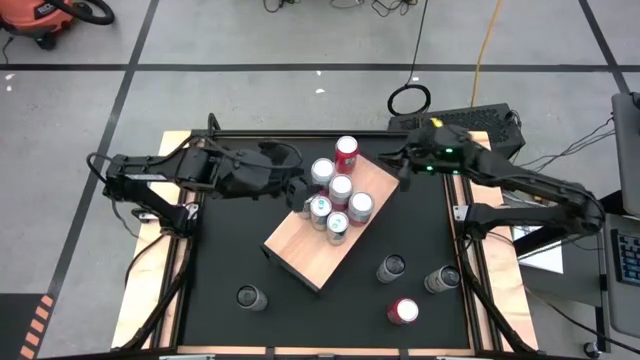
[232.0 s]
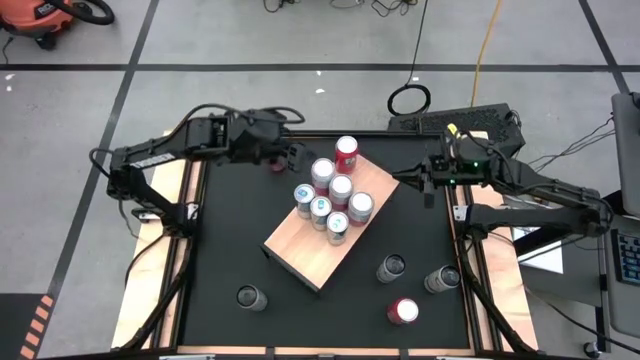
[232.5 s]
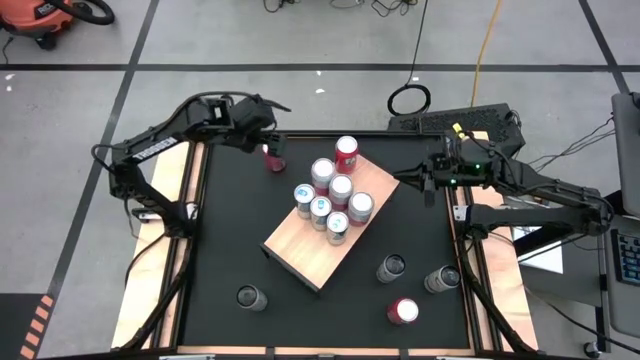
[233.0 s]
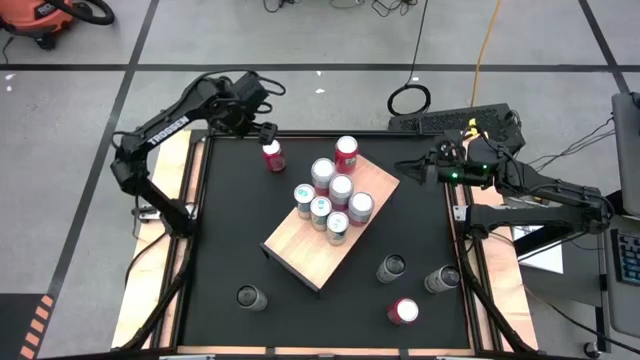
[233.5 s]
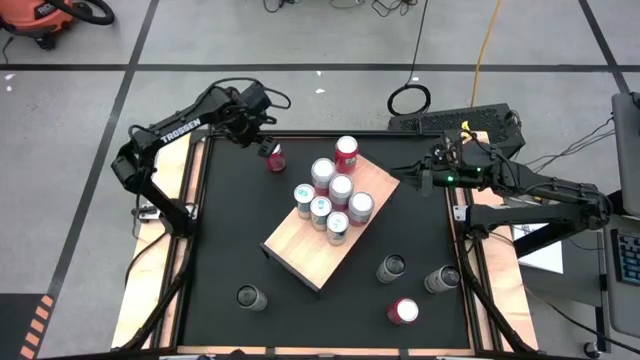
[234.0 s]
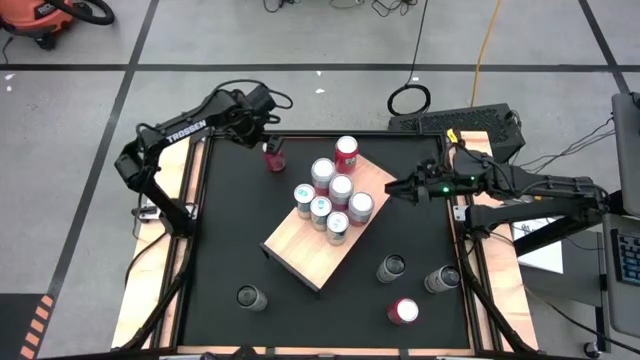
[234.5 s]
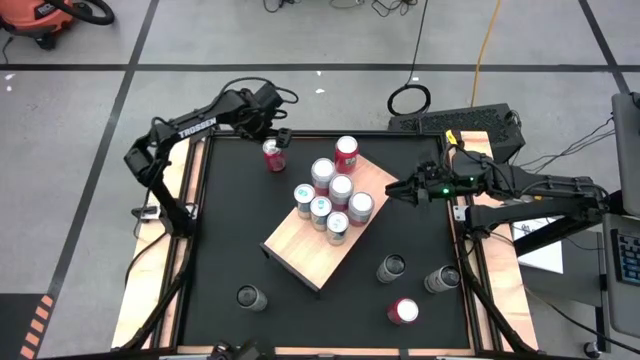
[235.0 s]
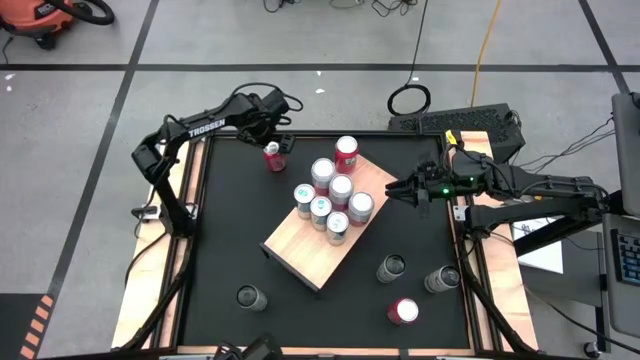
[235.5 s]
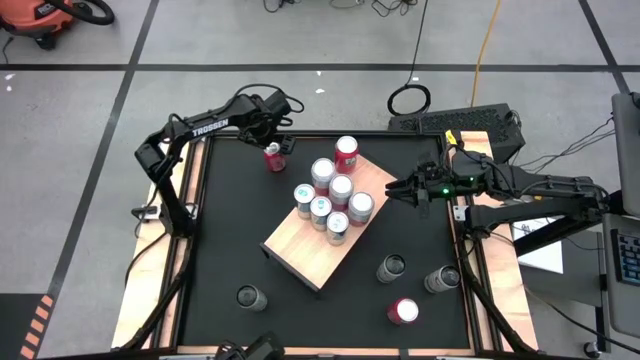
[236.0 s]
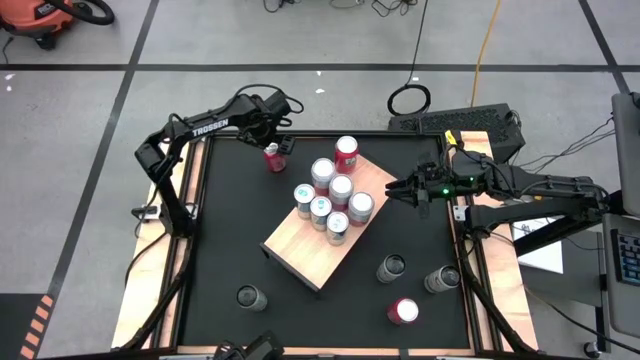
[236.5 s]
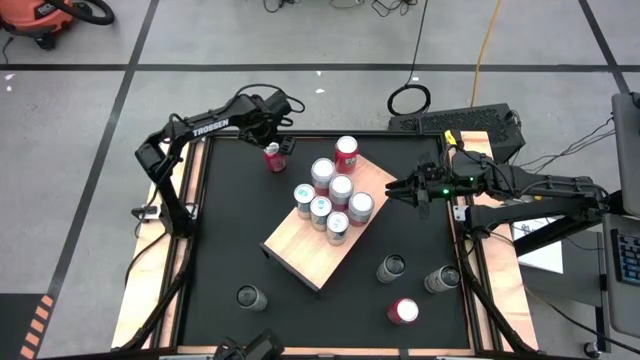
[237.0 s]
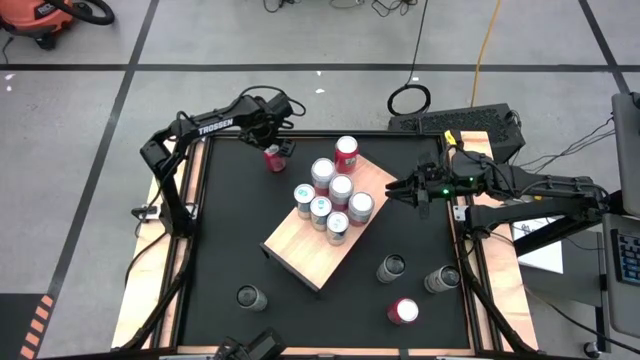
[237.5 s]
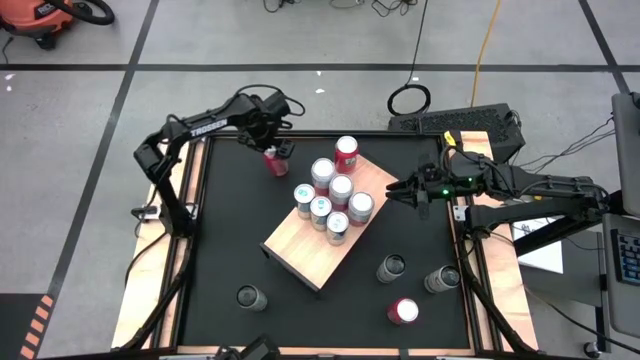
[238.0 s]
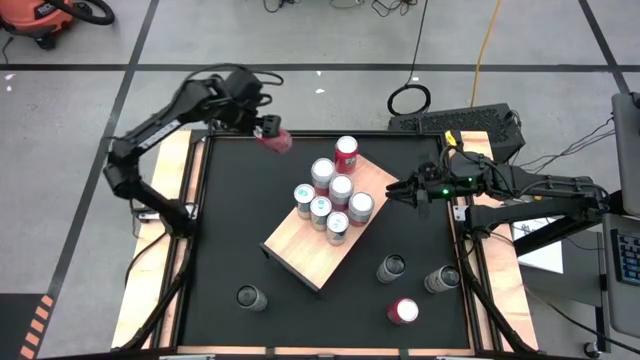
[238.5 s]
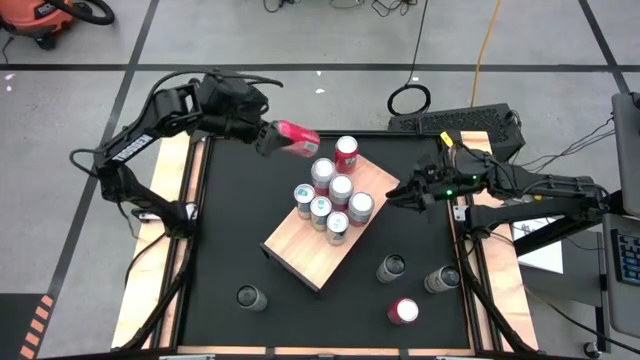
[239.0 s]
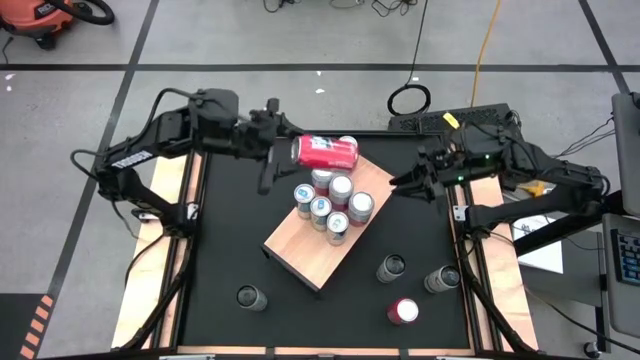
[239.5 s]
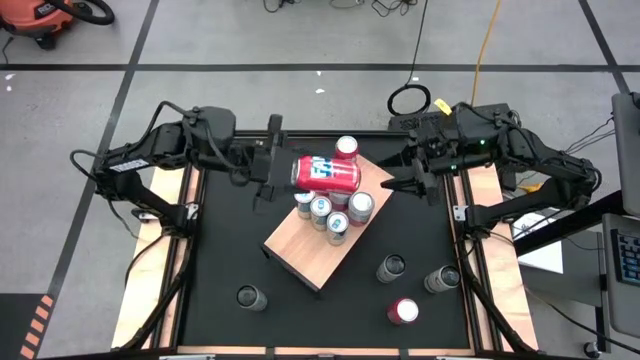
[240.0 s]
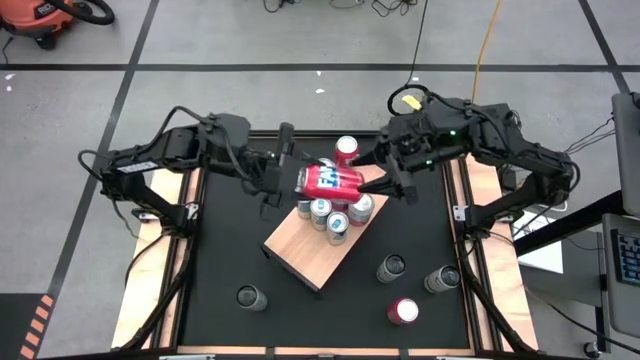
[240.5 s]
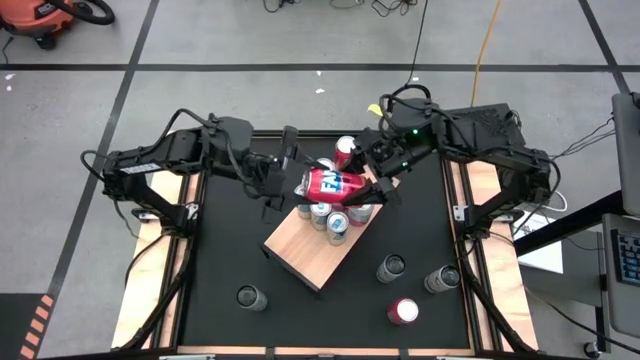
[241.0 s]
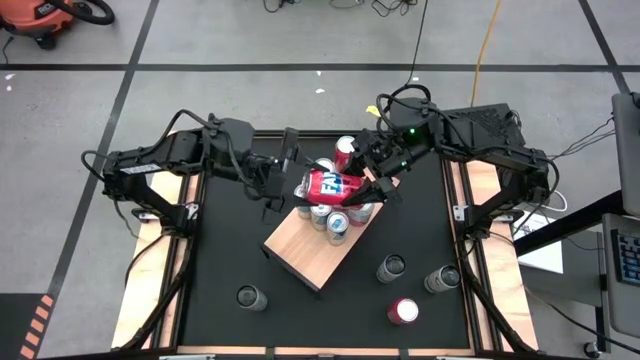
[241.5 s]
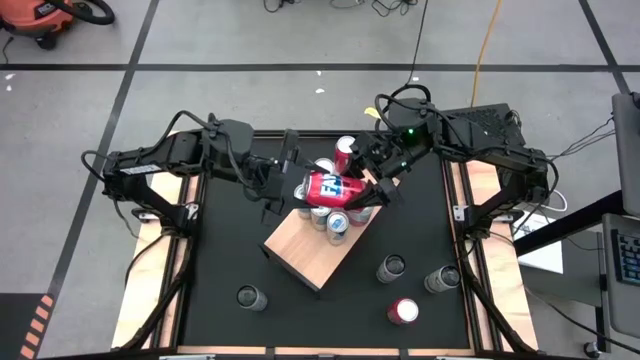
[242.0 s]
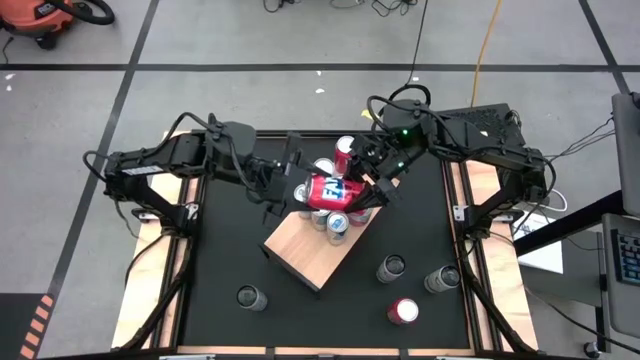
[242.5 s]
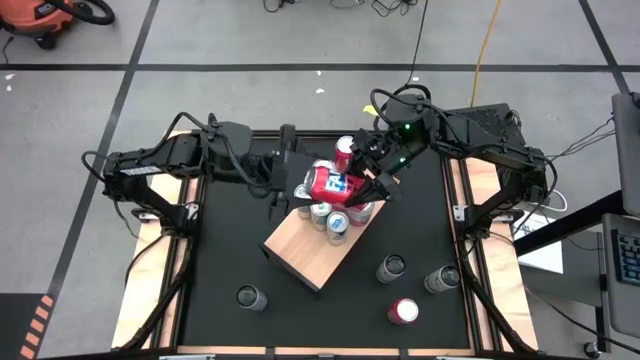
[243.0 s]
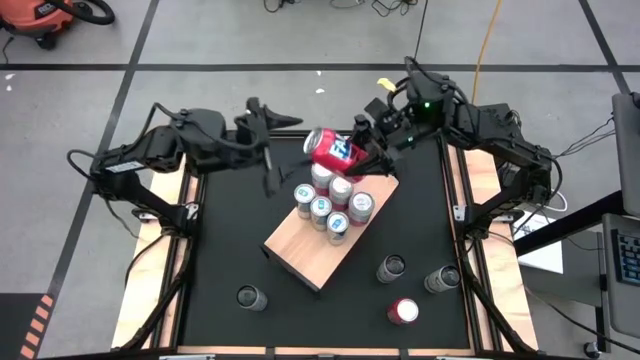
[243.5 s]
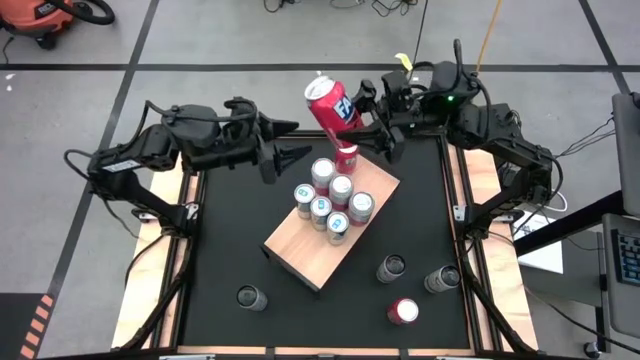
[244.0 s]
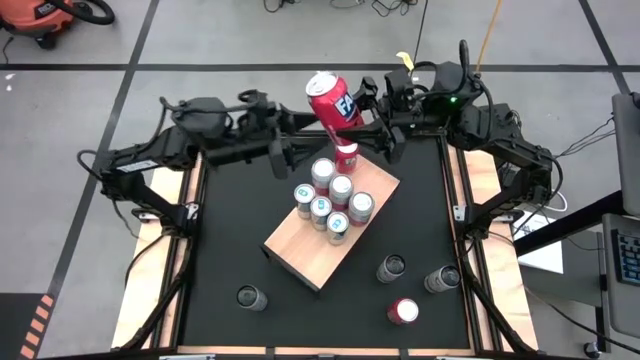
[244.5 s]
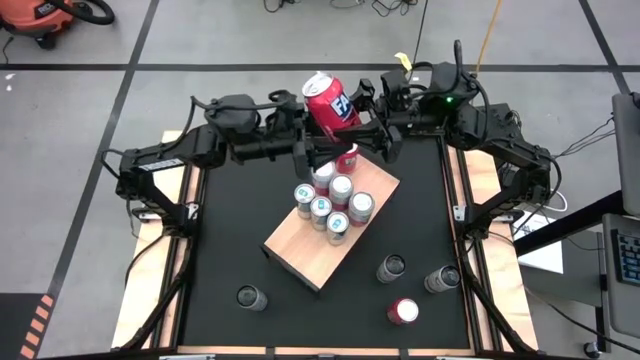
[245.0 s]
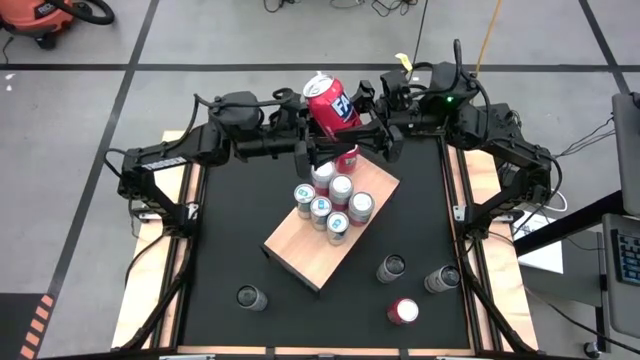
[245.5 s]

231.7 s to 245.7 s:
Task: Place canned beverage on shelf
Put the top red soda can on the shelf aligned with the red soda can

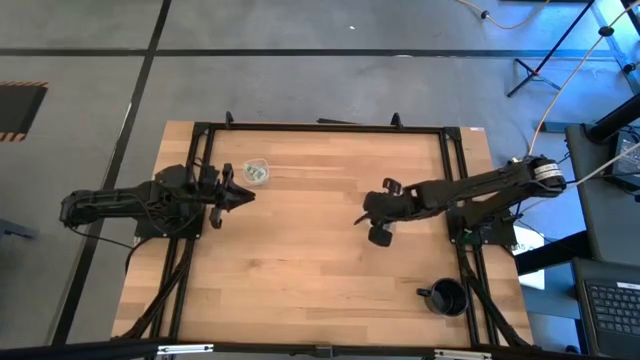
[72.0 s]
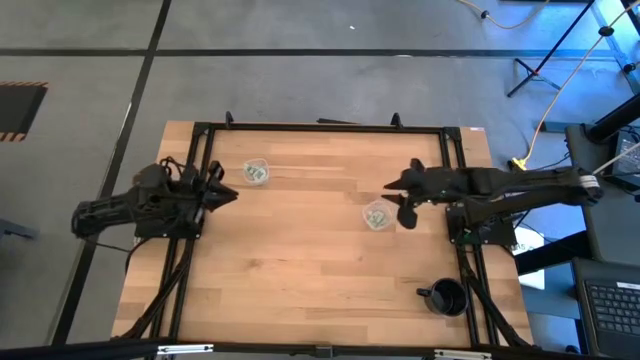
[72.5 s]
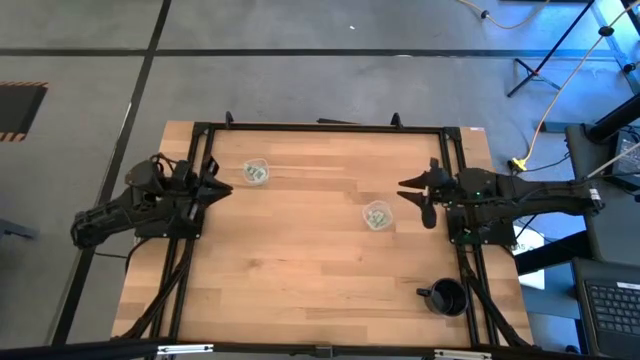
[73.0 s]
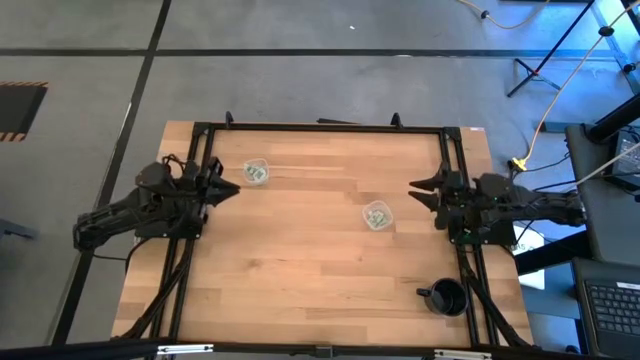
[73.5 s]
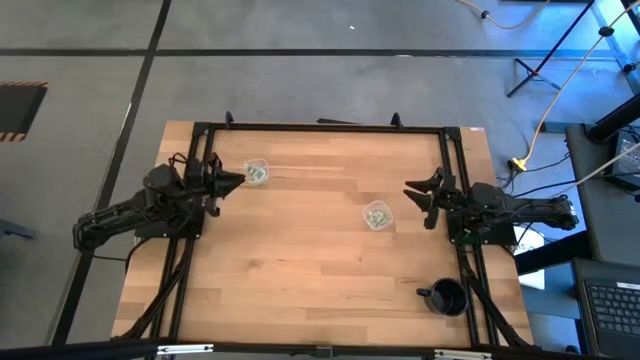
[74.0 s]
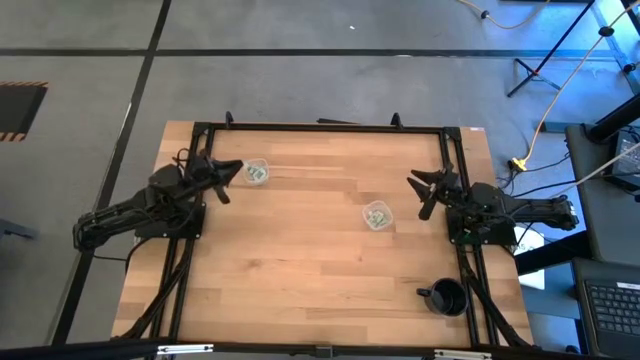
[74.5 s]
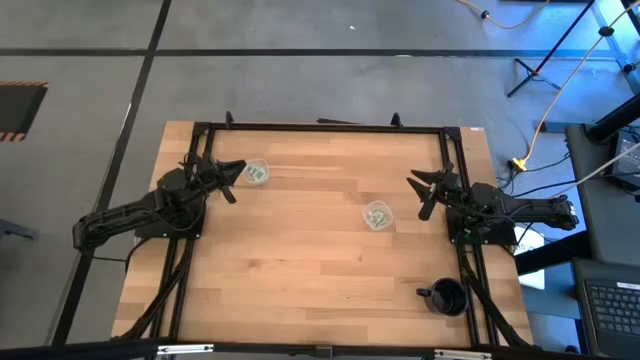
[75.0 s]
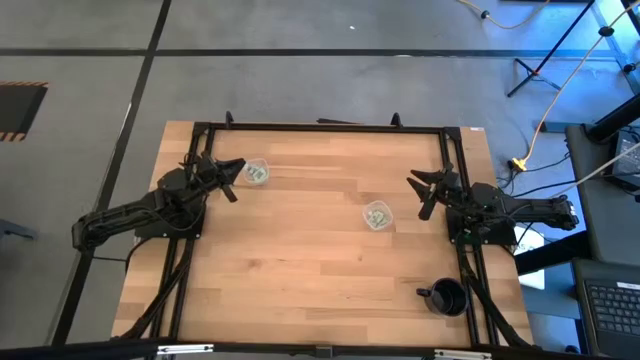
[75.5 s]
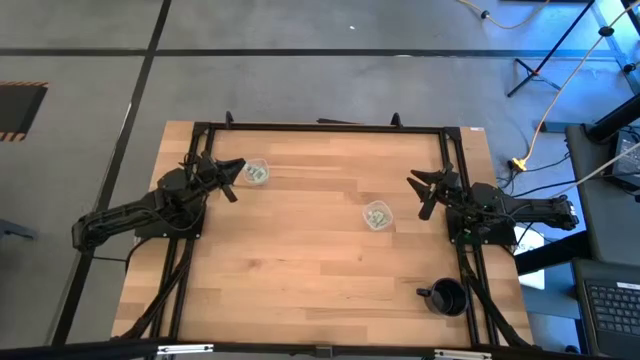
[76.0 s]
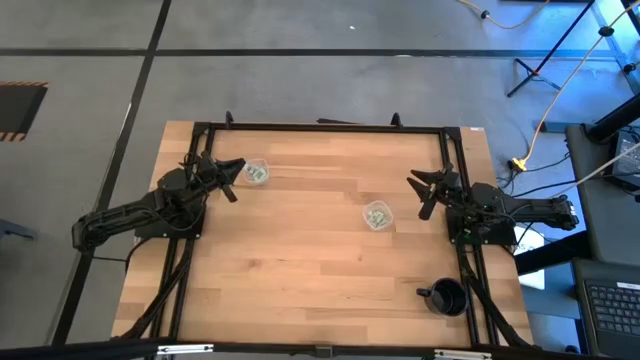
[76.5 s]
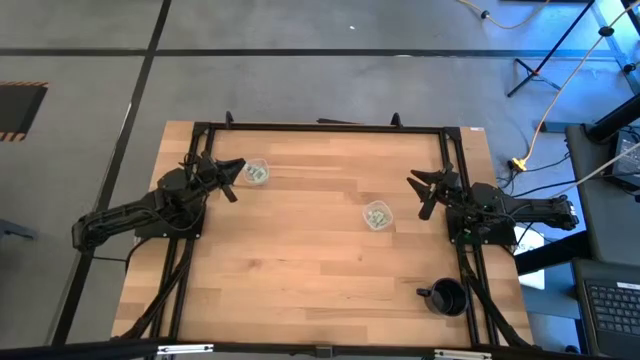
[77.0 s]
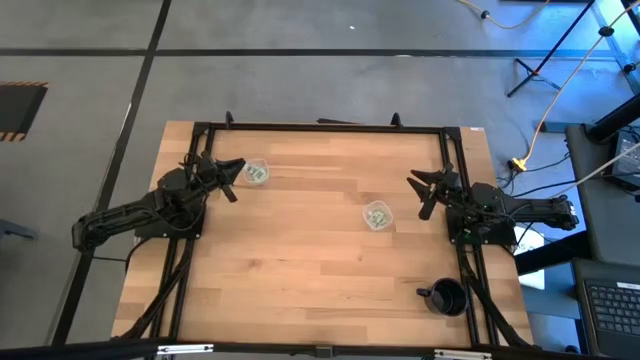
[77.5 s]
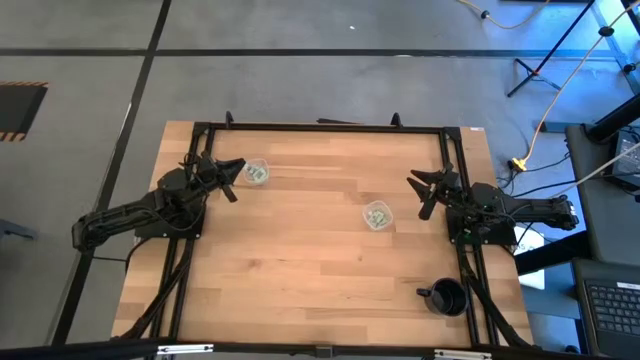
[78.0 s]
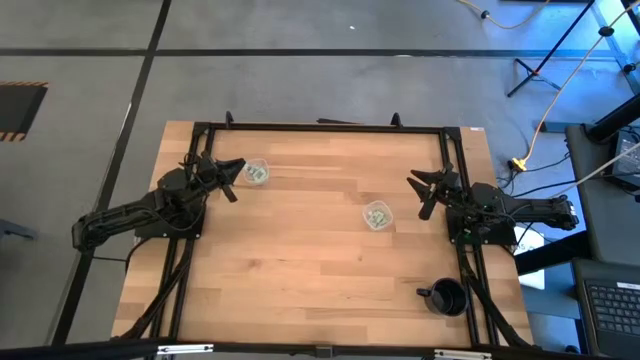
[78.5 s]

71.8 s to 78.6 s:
Task: Pick and place Stevia / Truvia into bins
Return to Home Position

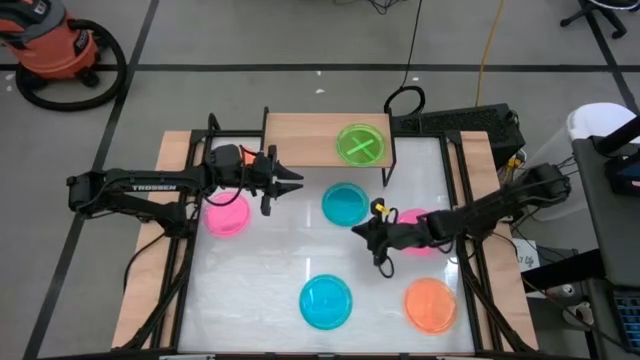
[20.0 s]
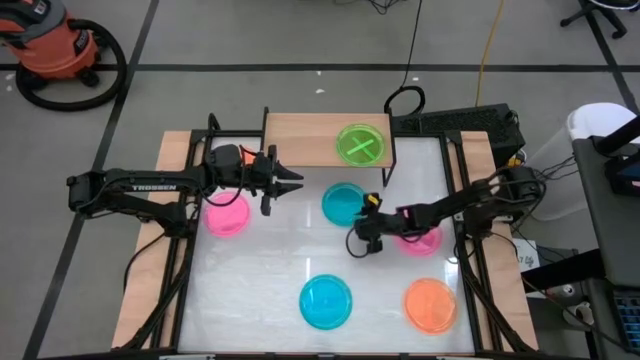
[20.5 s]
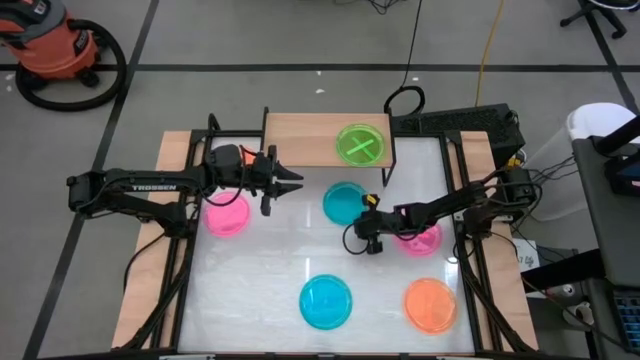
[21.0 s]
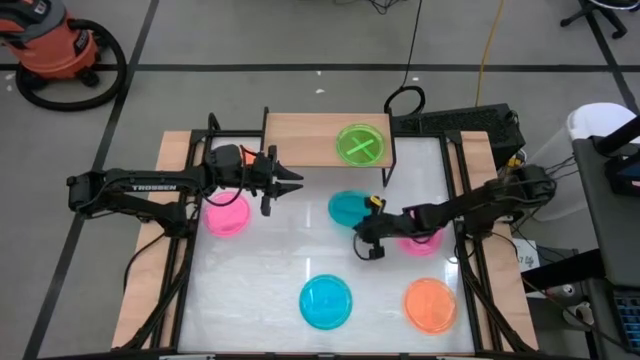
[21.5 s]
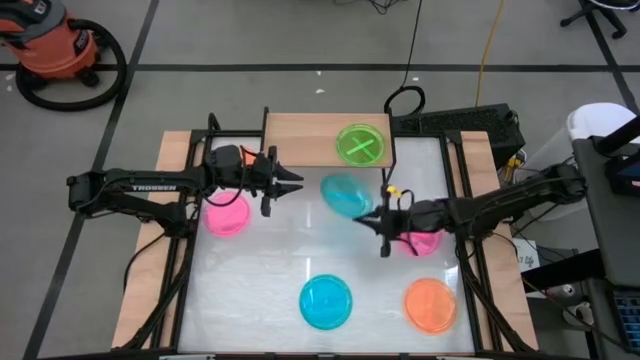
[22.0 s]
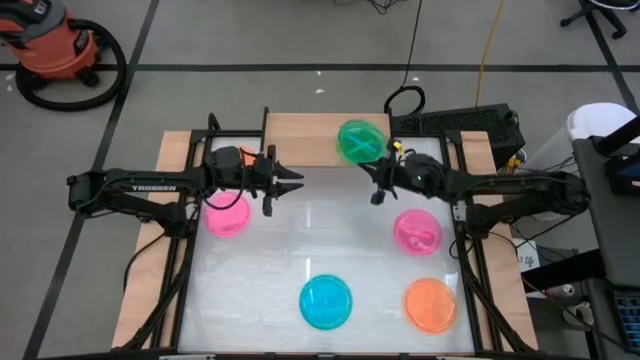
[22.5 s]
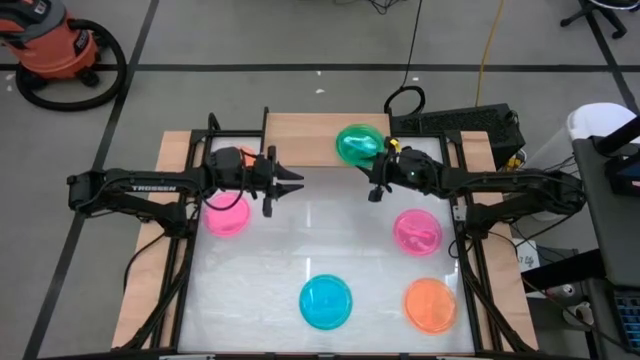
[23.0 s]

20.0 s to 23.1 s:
Task: Place and stack plates onto a shelf
Stack the top blue plate on top of the green plate on the shelf
